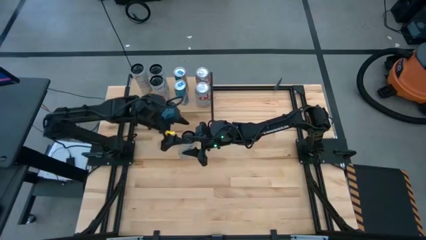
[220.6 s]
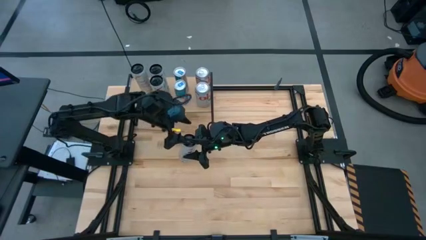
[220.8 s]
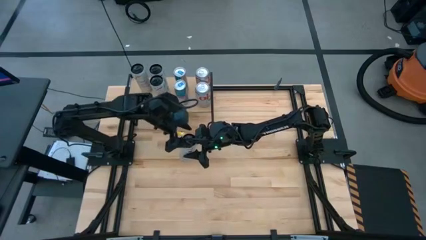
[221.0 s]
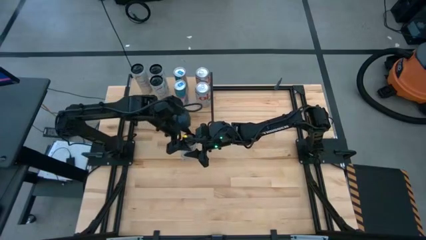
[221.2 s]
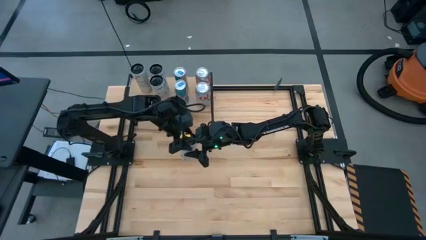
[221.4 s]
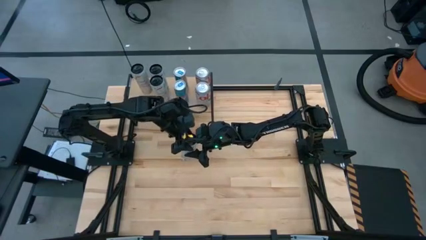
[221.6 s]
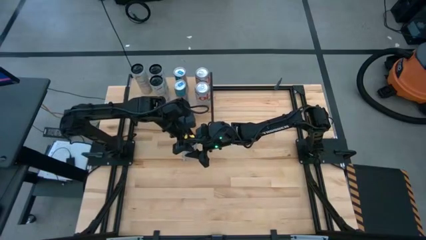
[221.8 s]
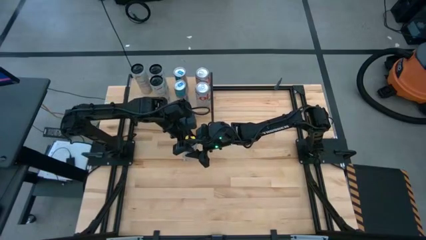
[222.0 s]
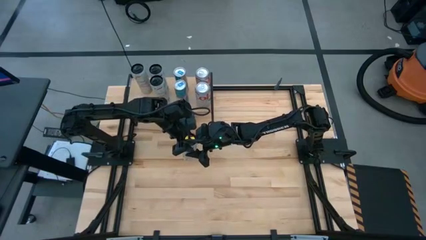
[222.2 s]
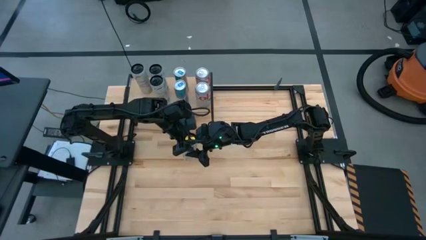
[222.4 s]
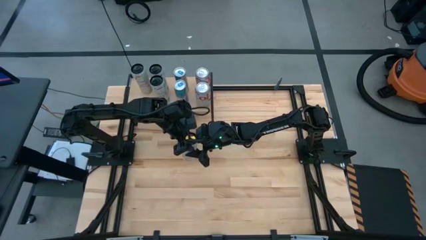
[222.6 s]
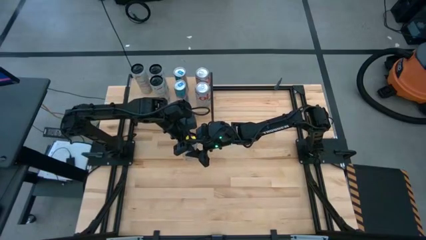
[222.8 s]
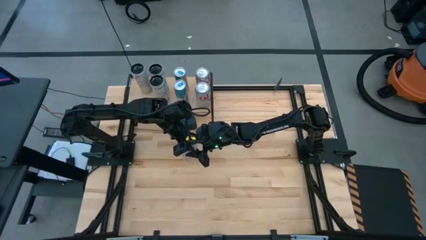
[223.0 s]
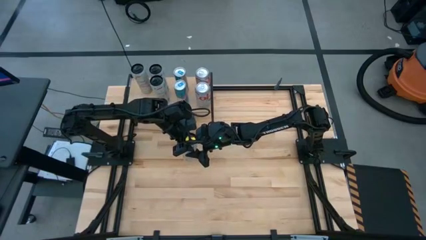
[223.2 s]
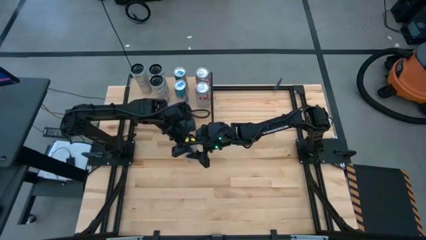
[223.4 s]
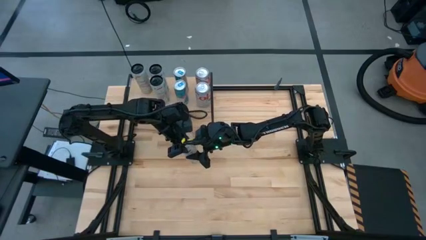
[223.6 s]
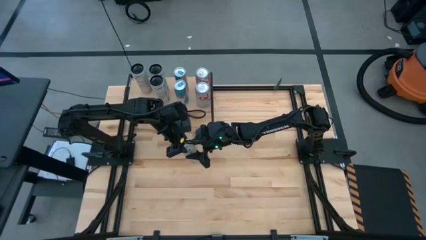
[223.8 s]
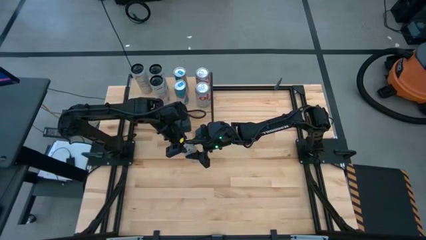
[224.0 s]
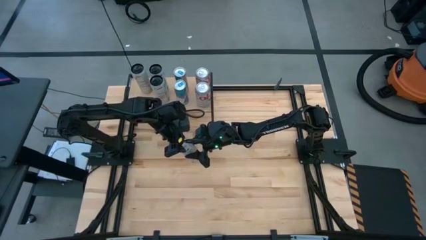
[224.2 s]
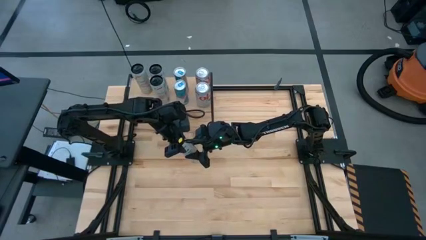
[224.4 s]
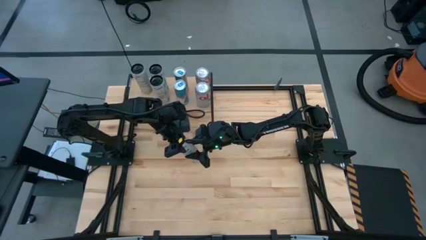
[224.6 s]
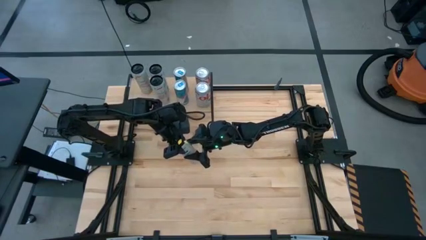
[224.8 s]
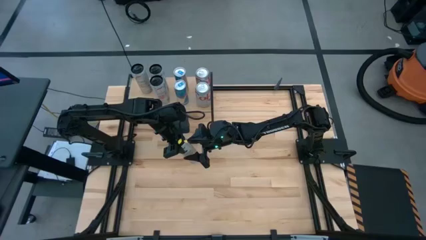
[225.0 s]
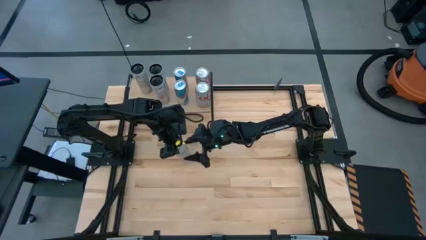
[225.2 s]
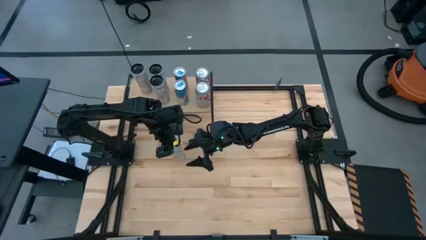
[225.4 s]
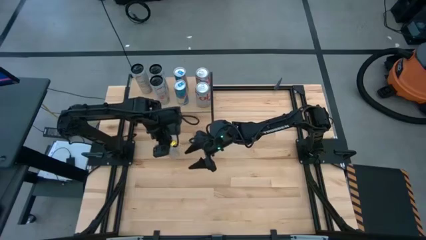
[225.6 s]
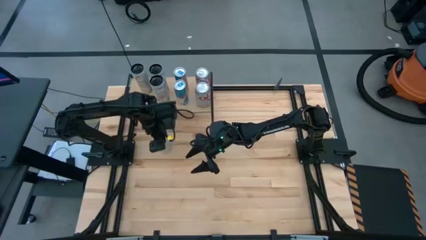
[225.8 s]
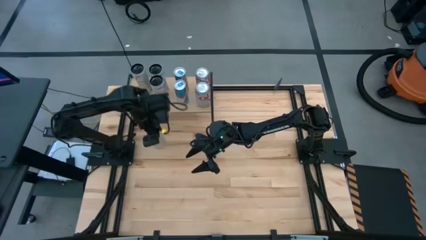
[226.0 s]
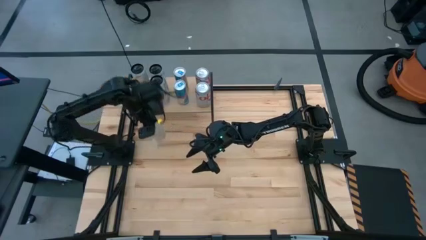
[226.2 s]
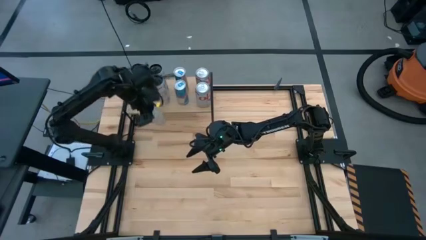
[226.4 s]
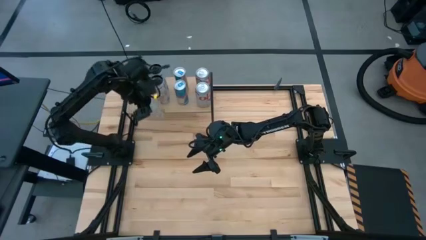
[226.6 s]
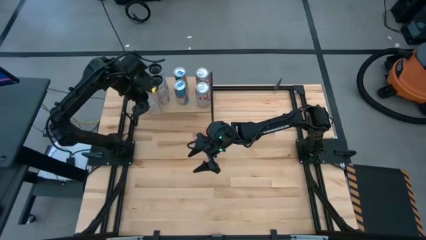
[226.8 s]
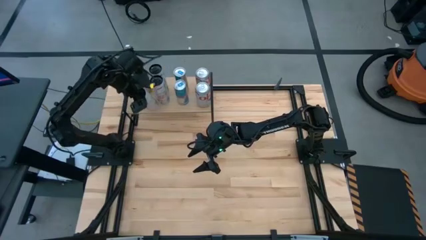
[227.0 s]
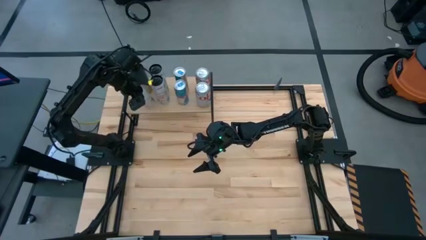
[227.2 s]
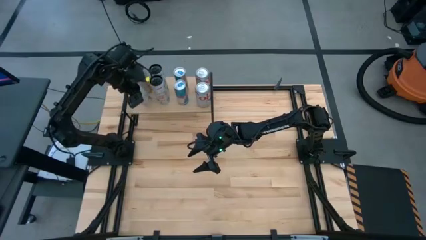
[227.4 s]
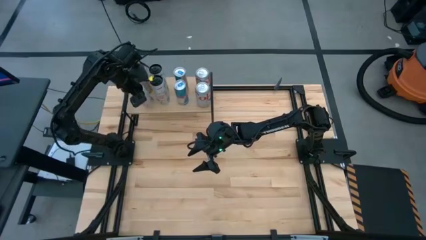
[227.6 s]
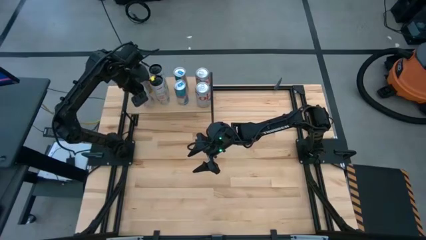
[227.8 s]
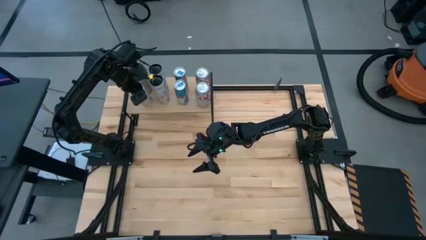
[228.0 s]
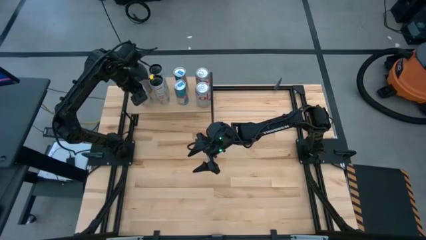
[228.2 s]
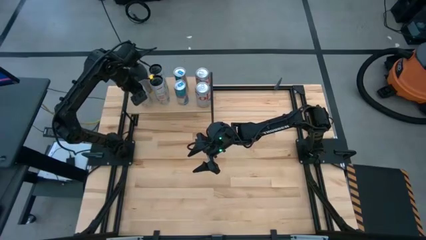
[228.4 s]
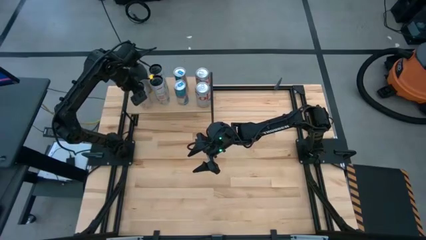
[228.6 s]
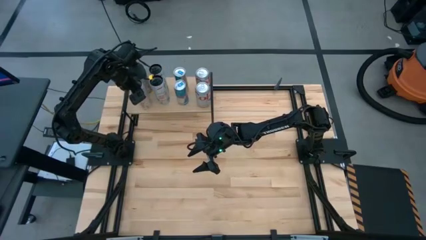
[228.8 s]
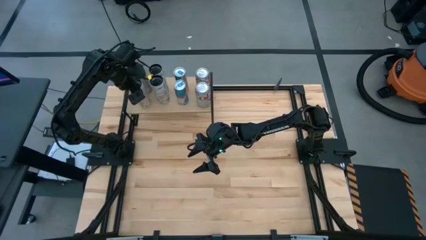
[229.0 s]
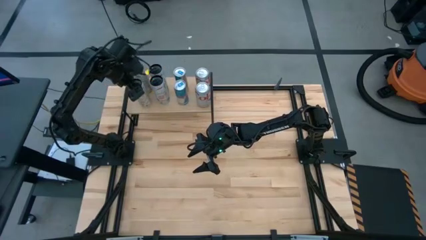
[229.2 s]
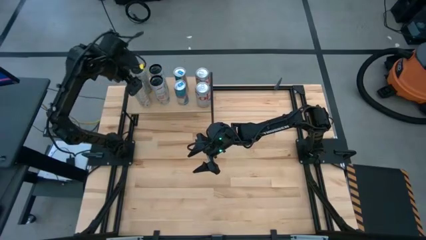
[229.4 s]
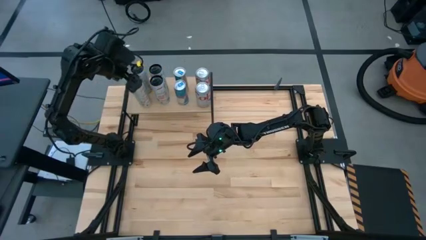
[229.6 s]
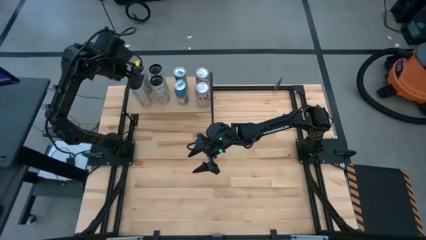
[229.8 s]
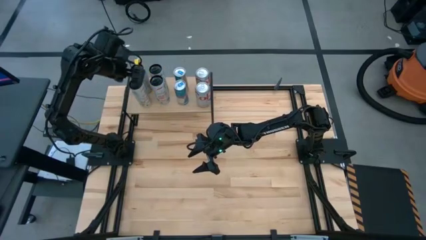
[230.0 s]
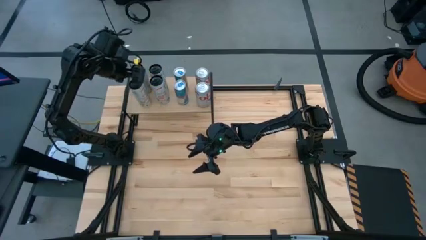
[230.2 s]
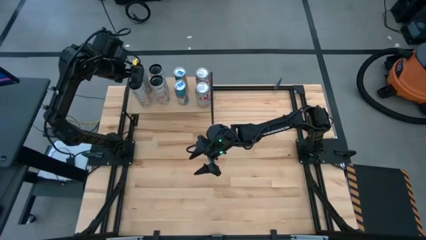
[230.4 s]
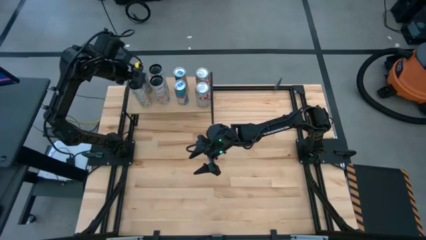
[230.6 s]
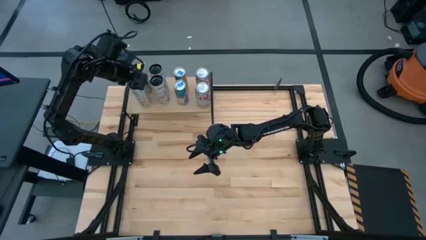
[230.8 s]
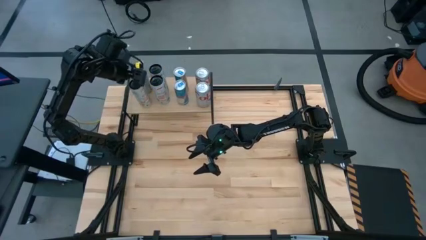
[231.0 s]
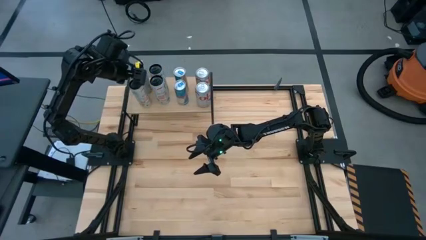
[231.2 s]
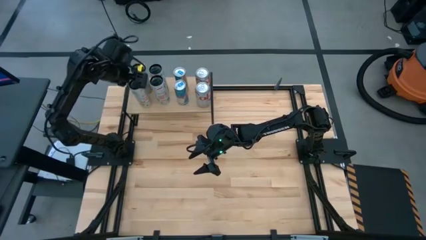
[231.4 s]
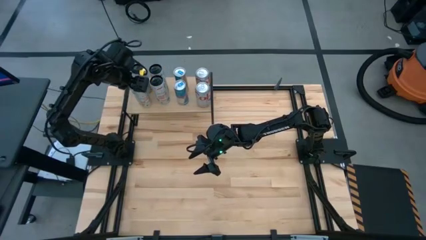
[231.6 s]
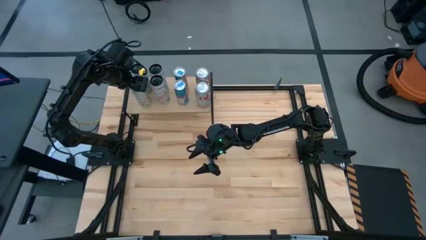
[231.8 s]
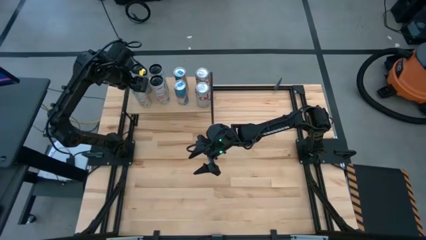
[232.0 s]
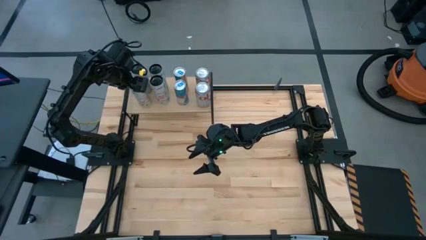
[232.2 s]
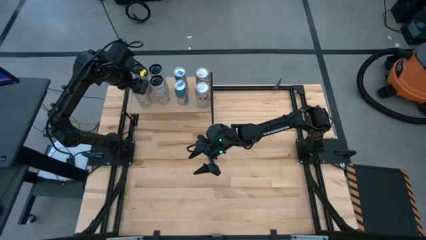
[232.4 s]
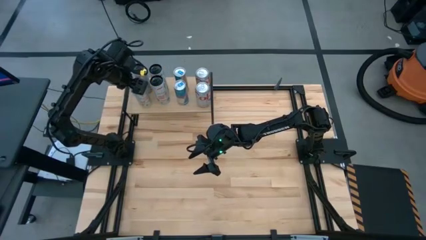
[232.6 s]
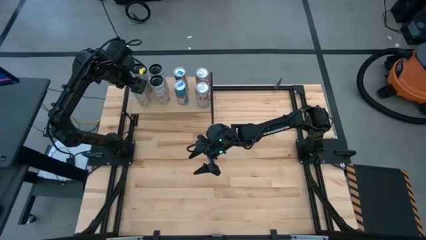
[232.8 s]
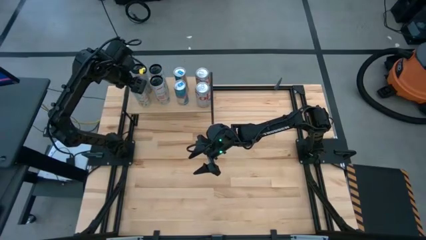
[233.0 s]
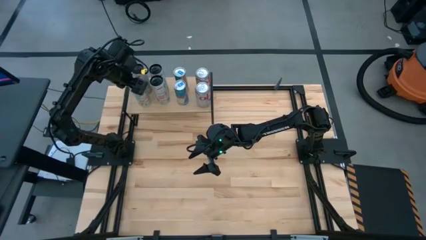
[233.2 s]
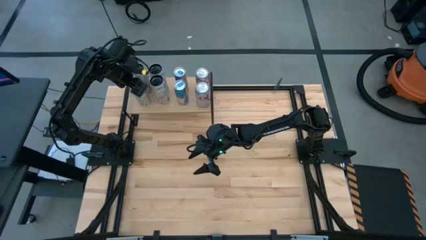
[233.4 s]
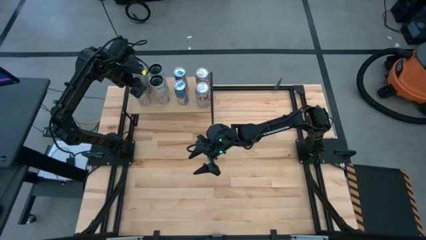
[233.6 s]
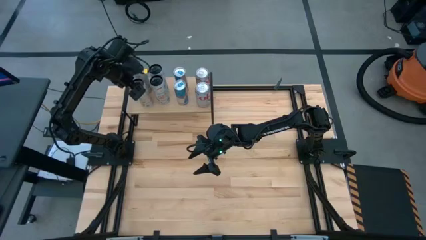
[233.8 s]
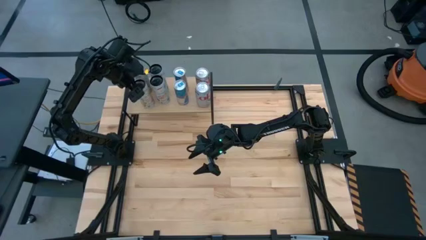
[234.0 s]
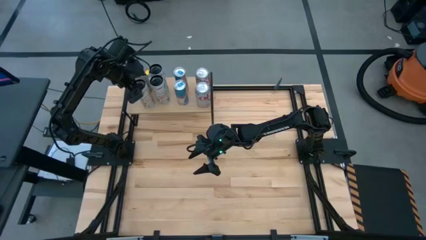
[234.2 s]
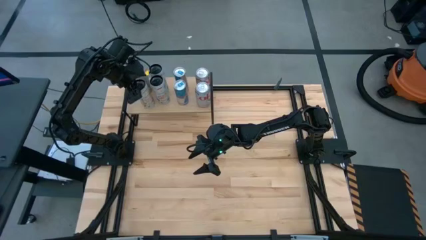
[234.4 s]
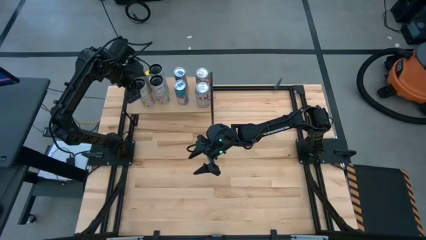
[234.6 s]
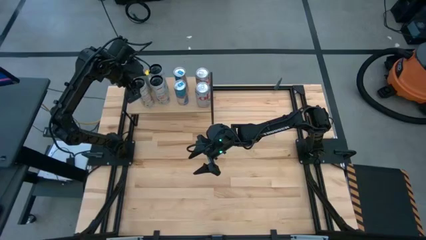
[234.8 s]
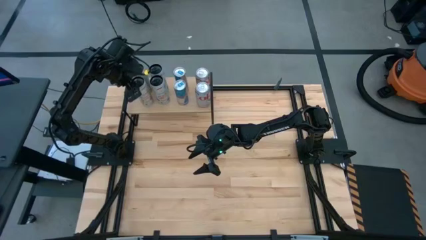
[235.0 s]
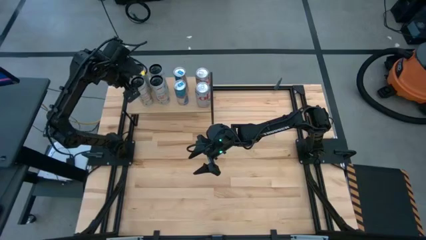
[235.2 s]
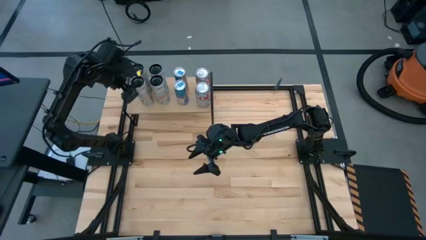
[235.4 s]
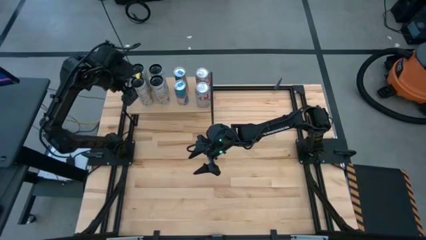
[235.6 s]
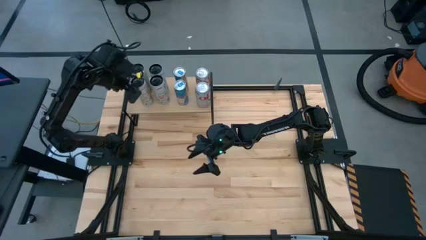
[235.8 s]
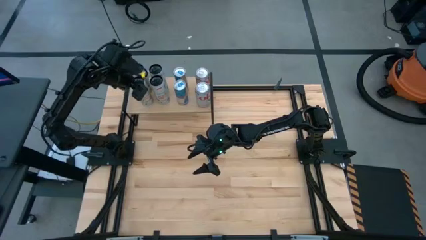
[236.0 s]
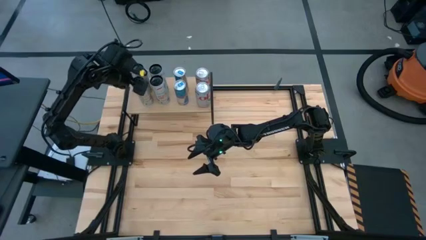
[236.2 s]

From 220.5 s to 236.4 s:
Task: Place canned beverage on shelf
Put the white-yellow soda can on the shelf aligned with the other white-yellow soda can
